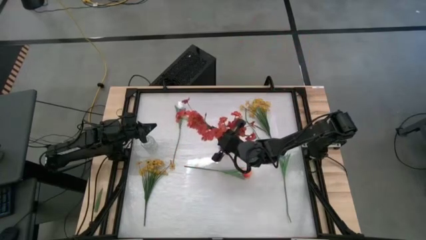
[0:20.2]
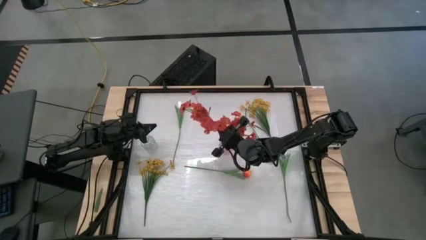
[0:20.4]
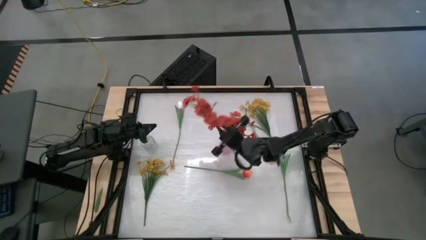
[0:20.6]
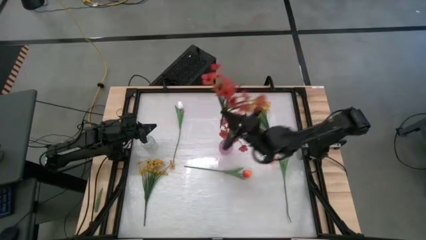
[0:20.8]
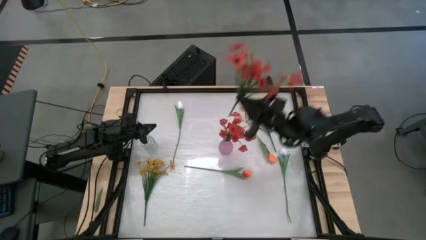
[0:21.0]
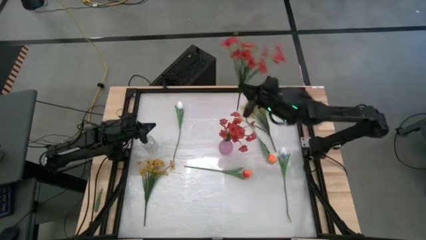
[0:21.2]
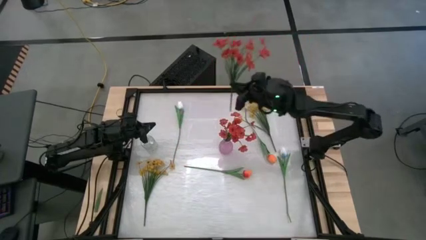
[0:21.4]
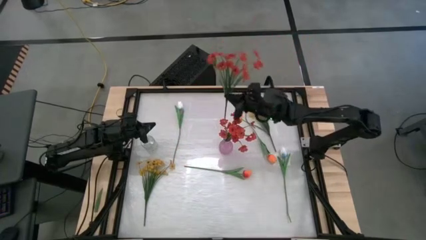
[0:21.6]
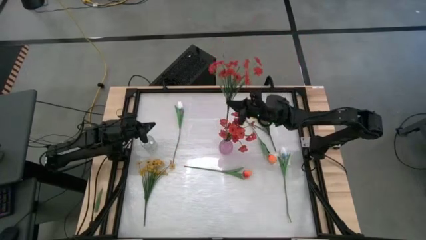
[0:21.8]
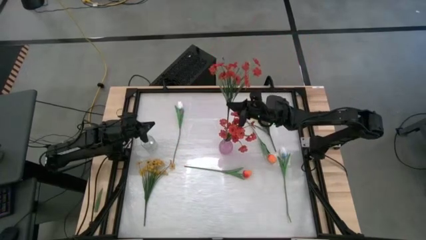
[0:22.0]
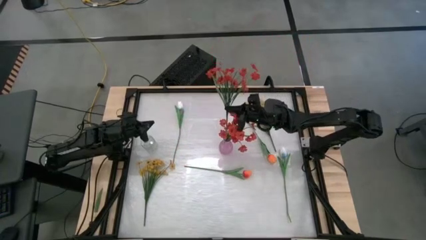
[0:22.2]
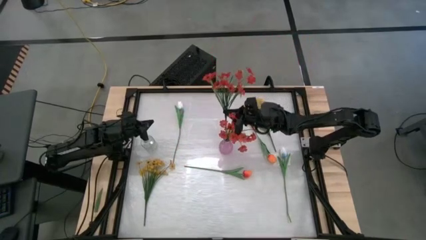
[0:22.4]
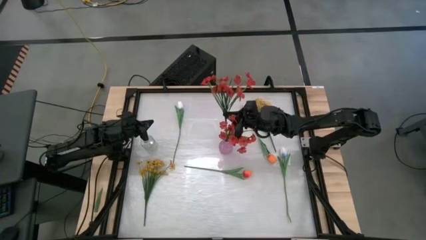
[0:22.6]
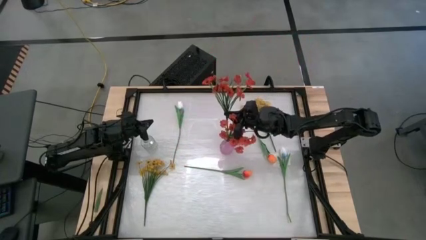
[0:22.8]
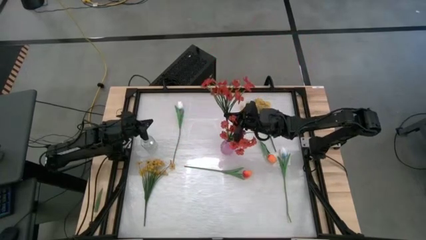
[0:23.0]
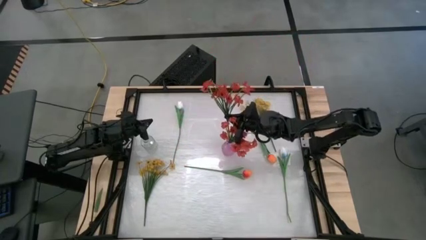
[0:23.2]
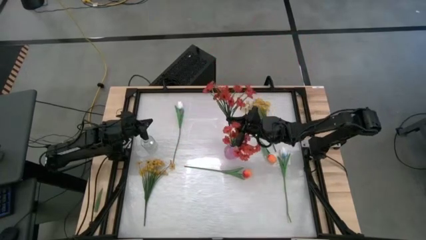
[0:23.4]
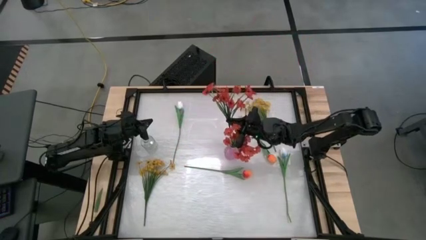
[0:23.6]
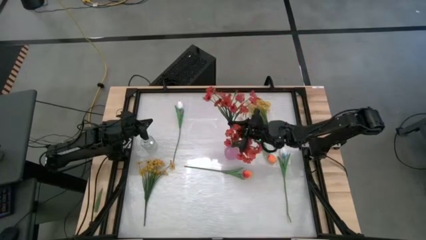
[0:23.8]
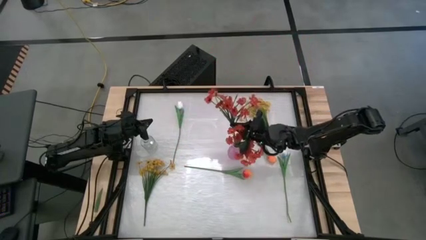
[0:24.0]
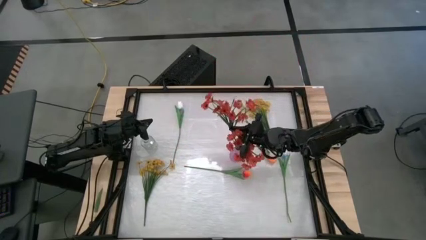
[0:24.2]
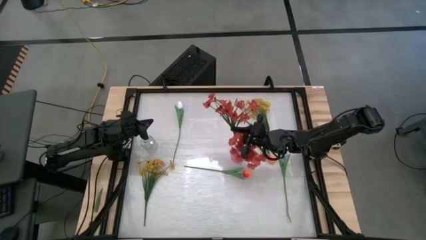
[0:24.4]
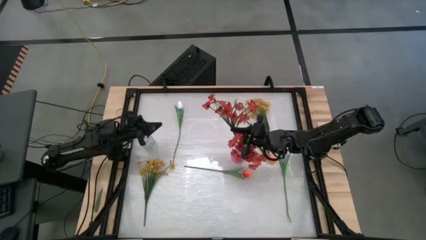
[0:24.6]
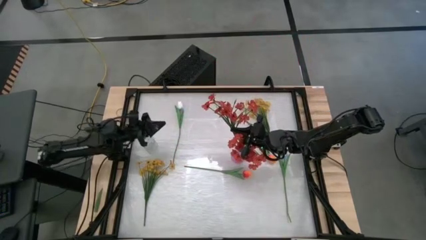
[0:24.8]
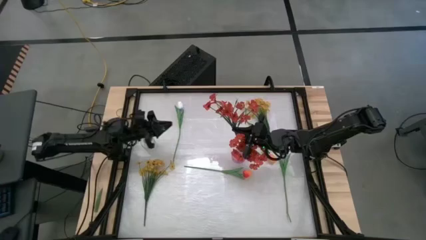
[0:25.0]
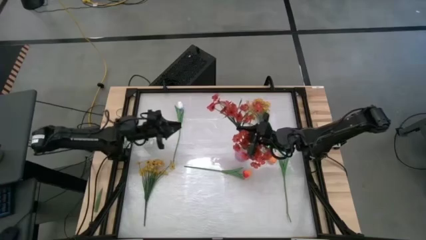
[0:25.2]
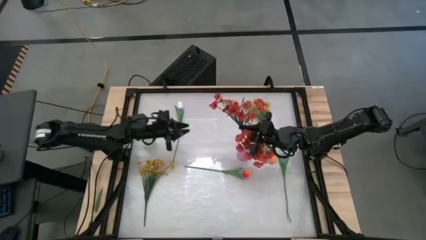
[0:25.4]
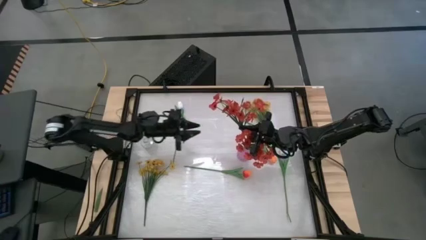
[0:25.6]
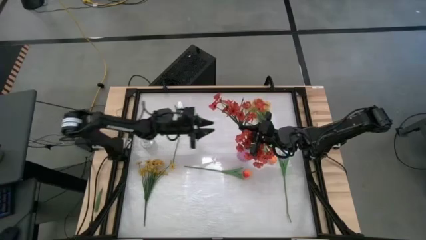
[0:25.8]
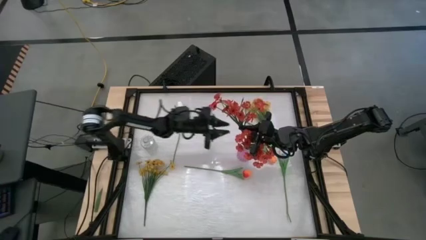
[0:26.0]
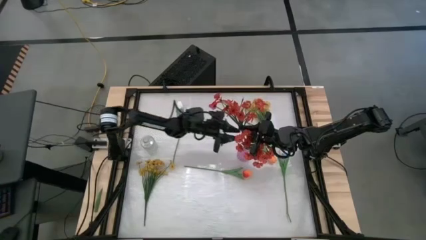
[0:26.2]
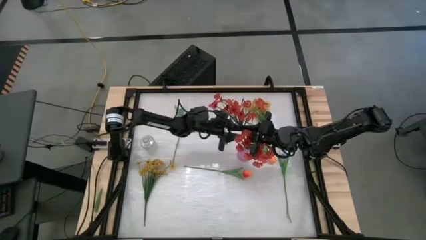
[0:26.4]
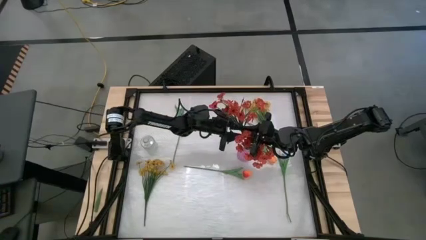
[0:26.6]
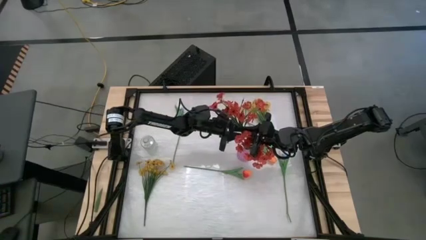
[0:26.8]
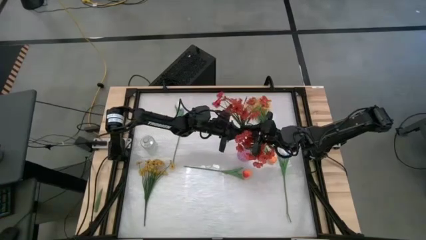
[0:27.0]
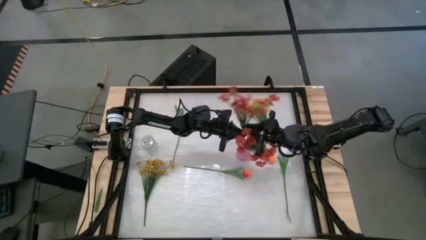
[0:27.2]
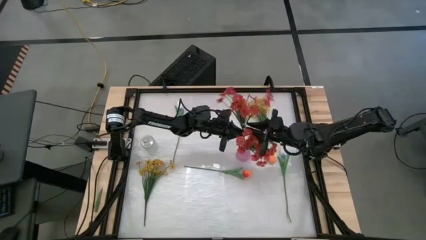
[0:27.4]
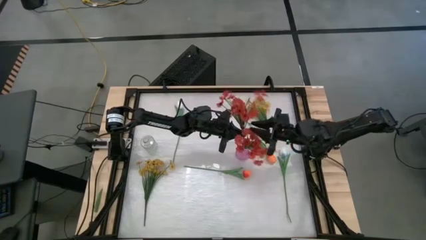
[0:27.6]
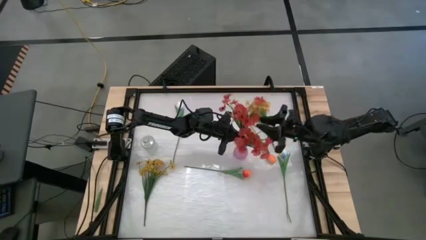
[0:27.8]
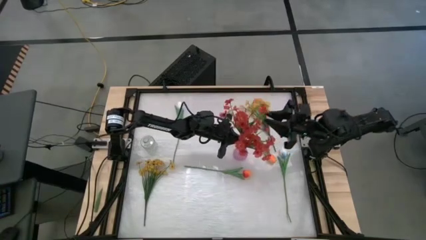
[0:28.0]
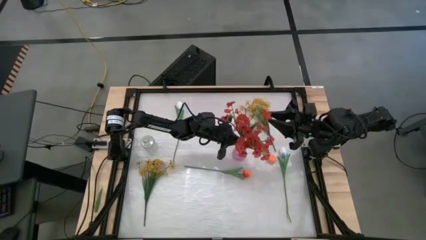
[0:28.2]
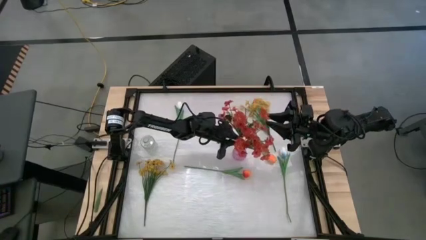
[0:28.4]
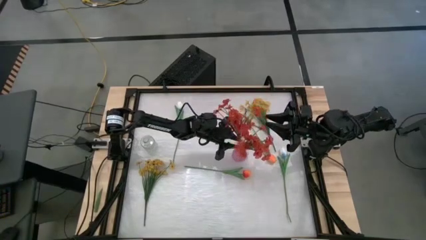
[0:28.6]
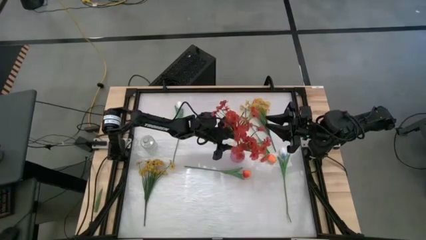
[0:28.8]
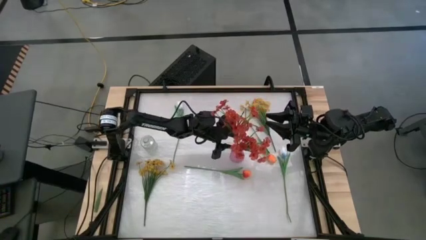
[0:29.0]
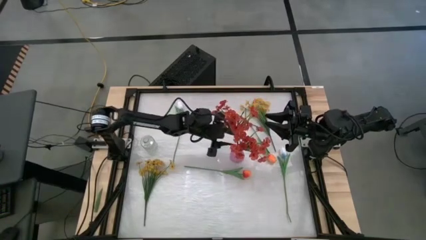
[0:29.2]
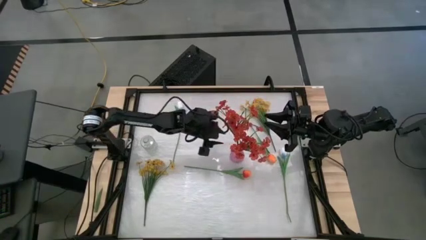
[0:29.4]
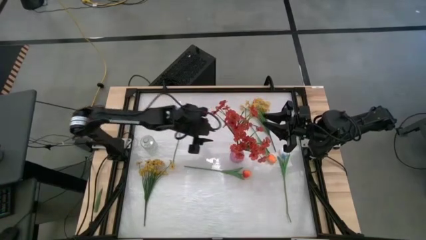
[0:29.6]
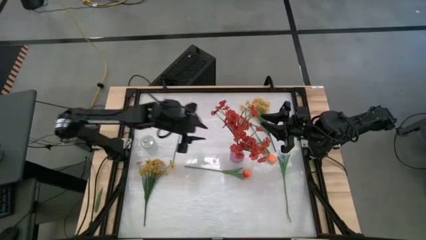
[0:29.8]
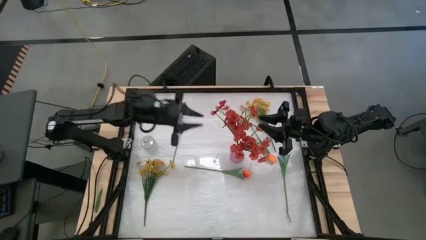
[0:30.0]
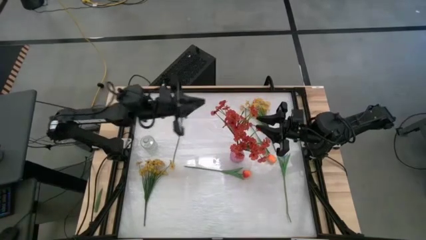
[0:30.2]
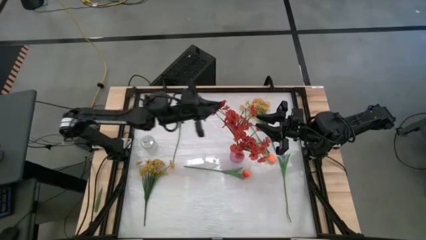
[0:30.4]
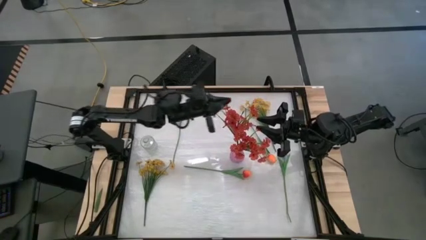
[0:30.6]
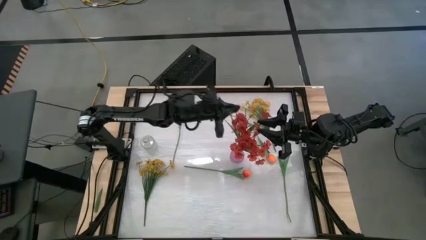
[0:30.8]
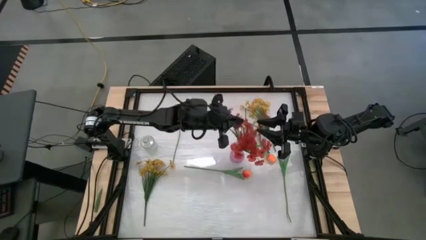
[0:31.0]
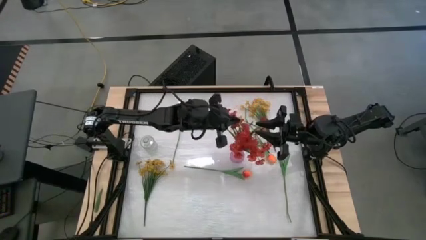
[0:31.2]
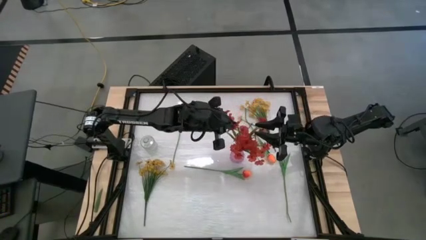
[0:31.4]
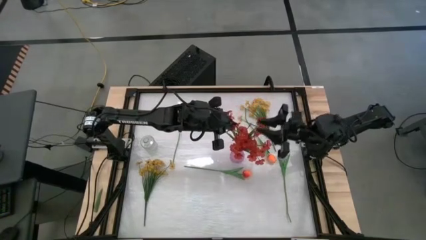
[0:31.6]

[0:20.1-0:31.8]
Task: Sort flowers into vase by color
Put the orange flowers into the violet vase
